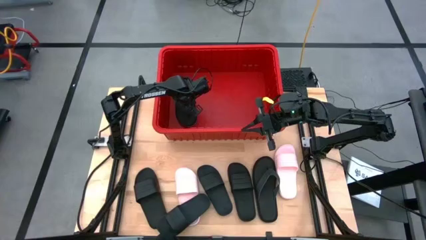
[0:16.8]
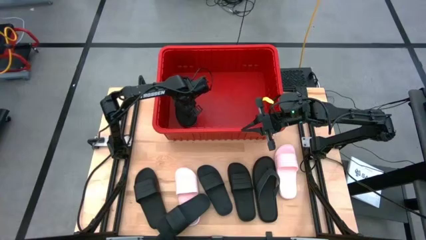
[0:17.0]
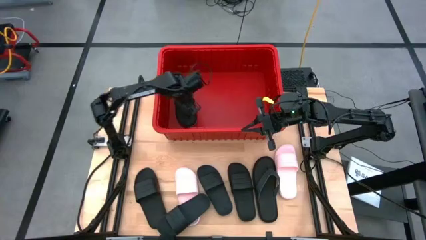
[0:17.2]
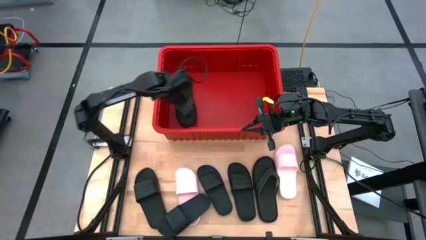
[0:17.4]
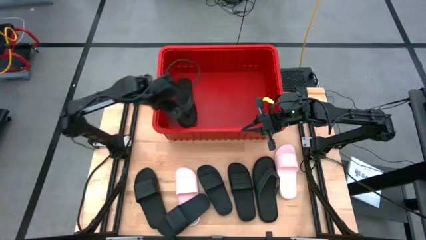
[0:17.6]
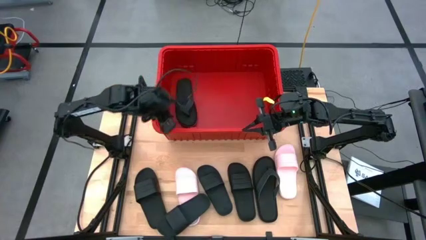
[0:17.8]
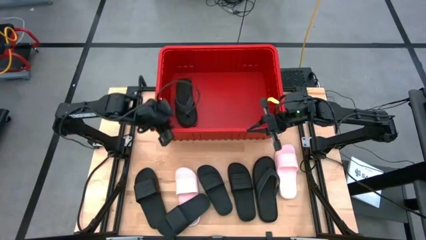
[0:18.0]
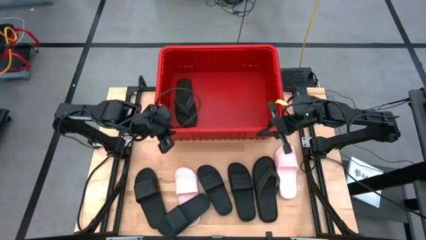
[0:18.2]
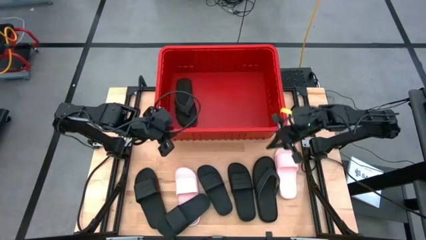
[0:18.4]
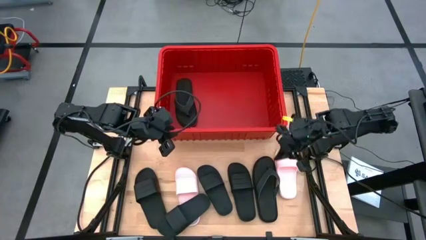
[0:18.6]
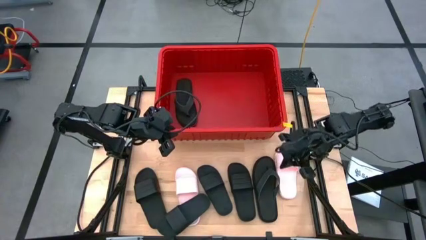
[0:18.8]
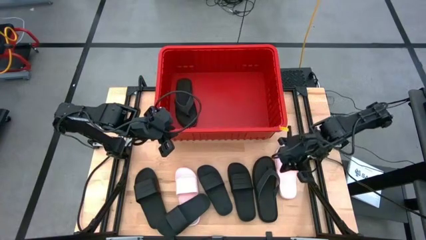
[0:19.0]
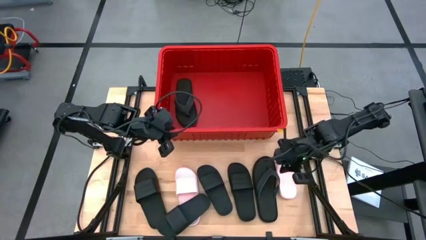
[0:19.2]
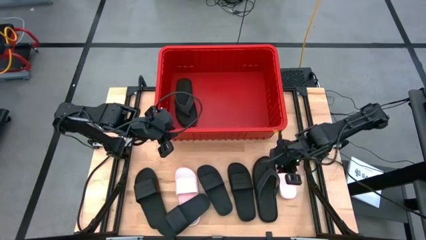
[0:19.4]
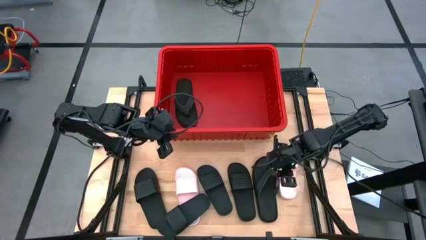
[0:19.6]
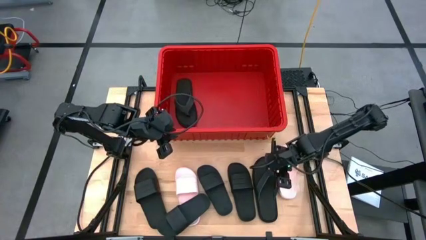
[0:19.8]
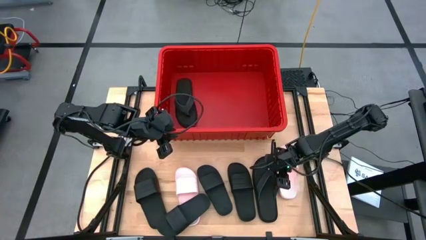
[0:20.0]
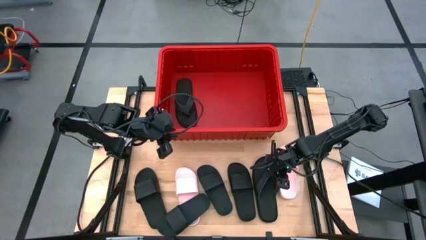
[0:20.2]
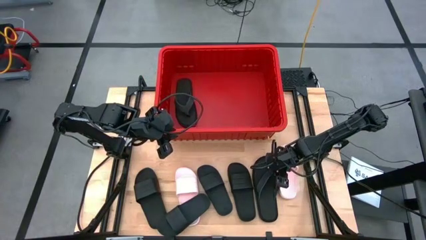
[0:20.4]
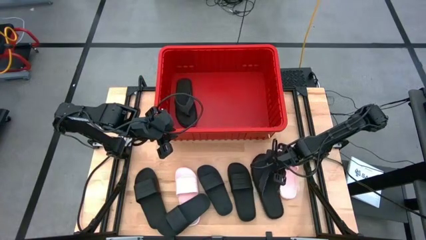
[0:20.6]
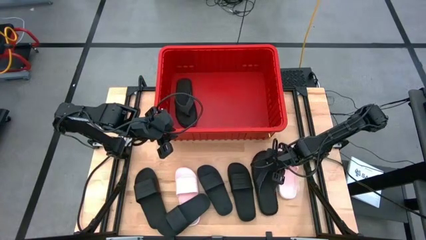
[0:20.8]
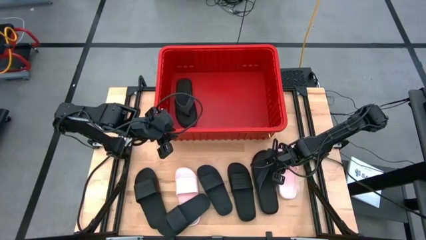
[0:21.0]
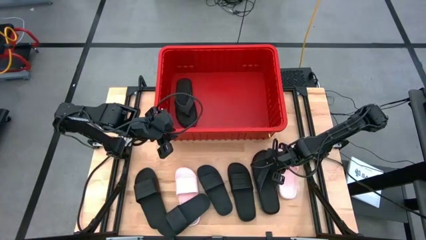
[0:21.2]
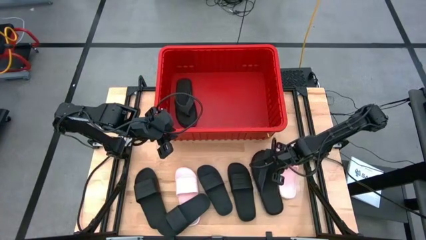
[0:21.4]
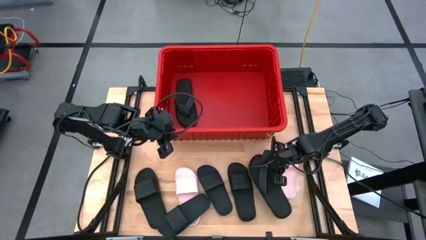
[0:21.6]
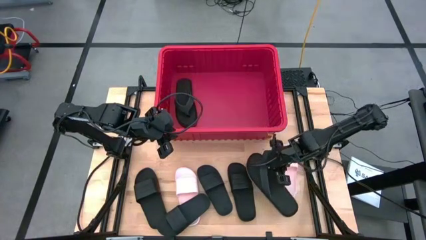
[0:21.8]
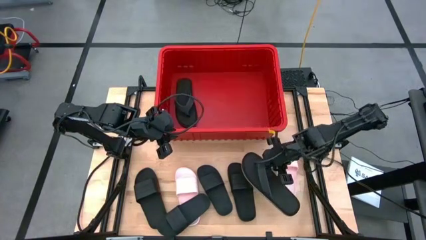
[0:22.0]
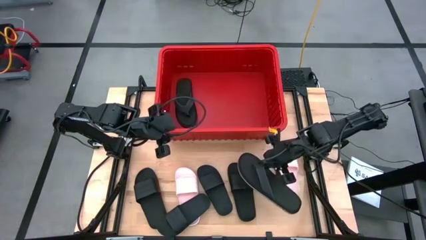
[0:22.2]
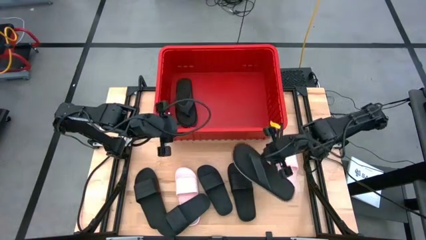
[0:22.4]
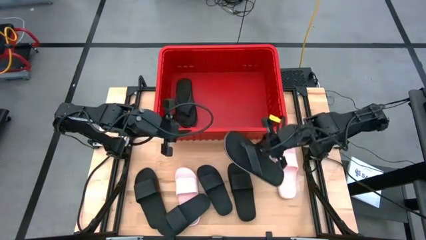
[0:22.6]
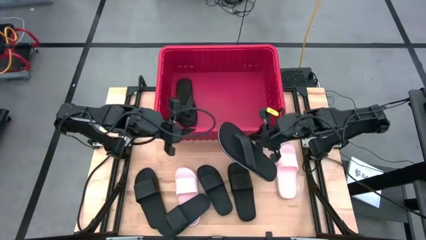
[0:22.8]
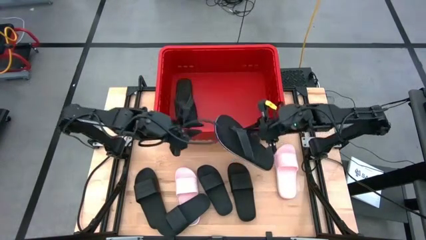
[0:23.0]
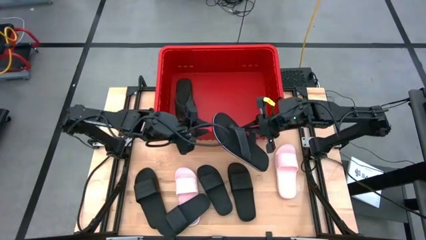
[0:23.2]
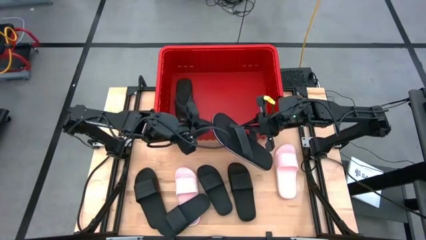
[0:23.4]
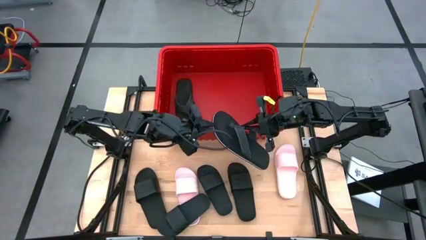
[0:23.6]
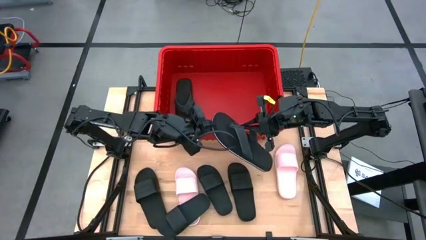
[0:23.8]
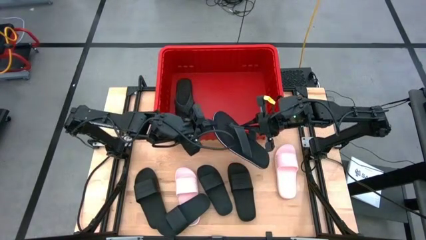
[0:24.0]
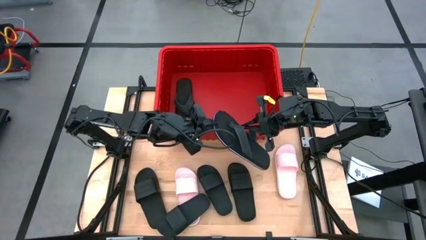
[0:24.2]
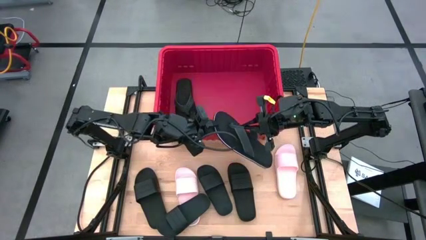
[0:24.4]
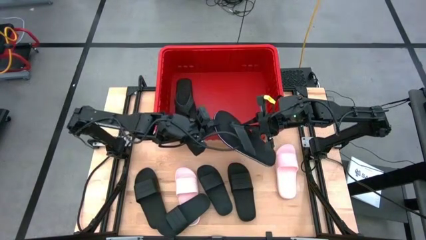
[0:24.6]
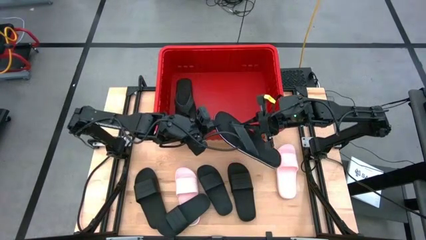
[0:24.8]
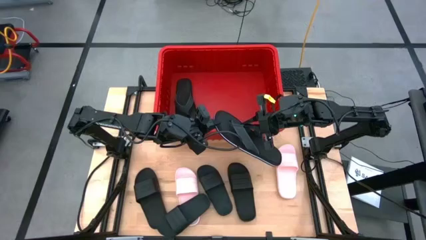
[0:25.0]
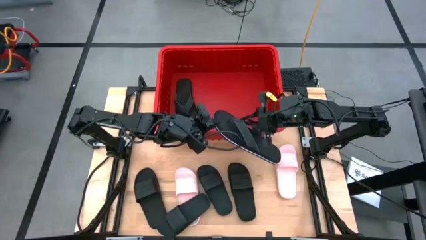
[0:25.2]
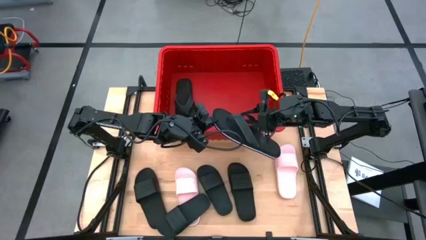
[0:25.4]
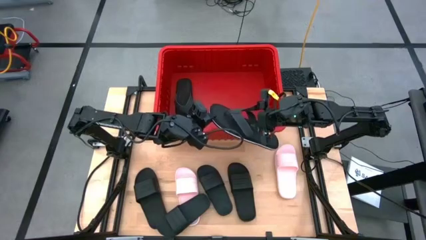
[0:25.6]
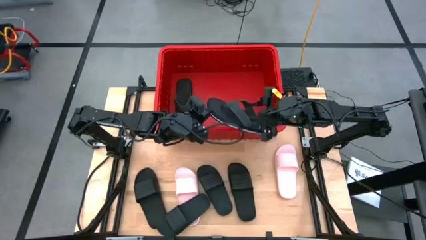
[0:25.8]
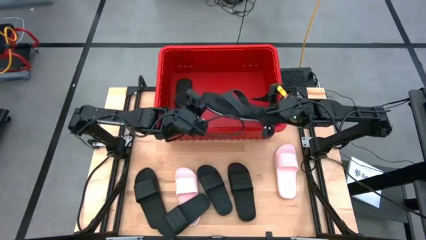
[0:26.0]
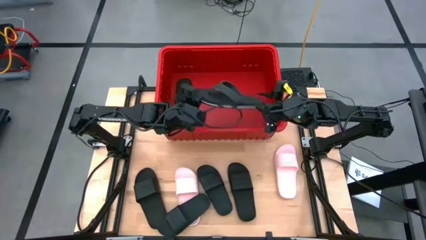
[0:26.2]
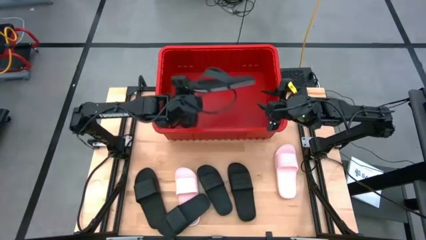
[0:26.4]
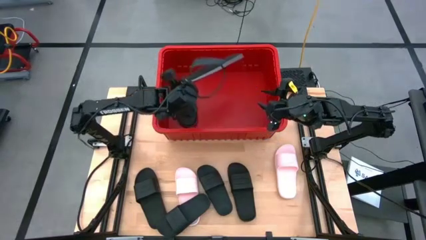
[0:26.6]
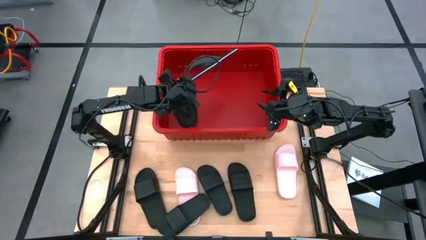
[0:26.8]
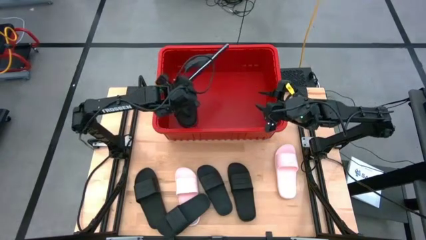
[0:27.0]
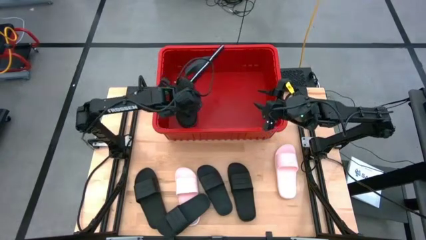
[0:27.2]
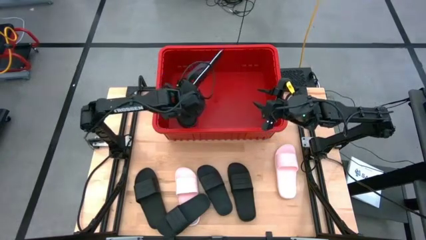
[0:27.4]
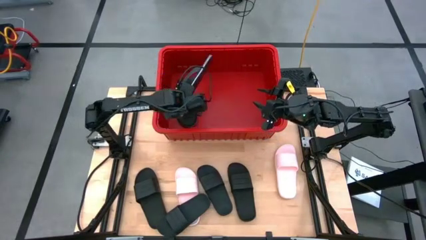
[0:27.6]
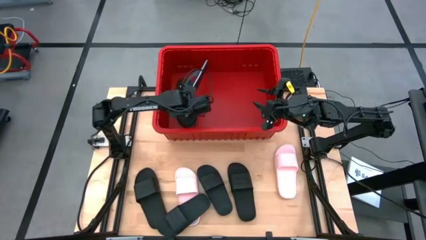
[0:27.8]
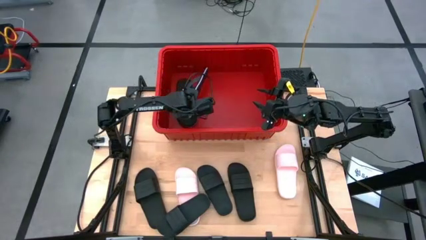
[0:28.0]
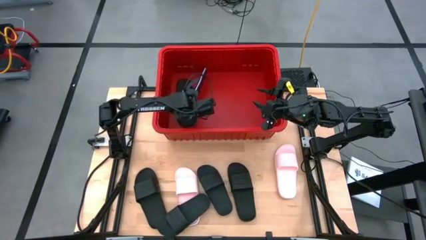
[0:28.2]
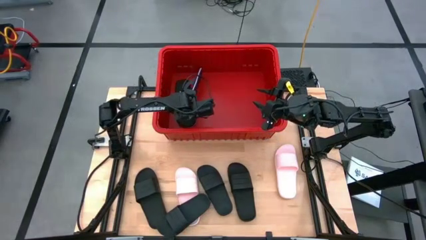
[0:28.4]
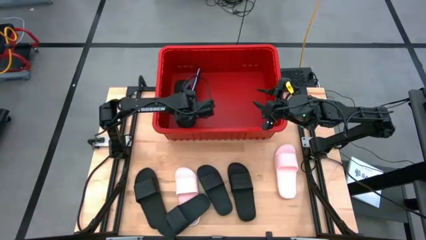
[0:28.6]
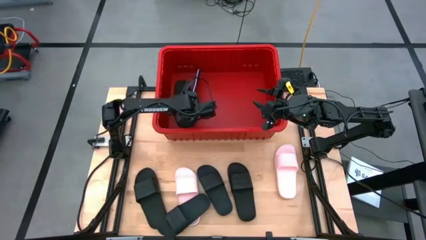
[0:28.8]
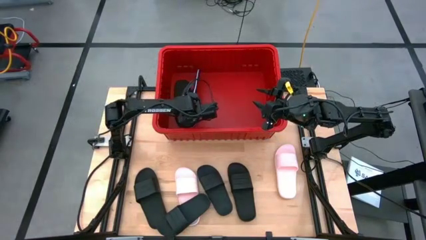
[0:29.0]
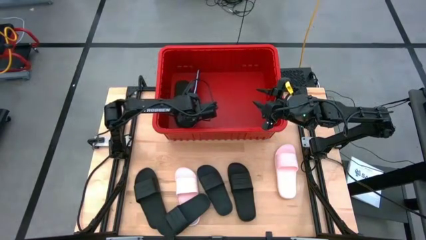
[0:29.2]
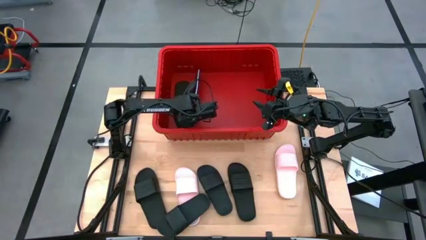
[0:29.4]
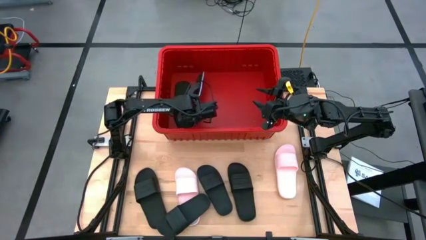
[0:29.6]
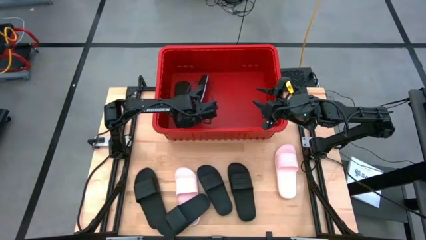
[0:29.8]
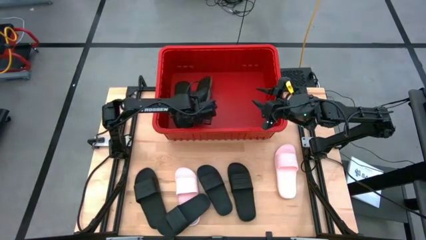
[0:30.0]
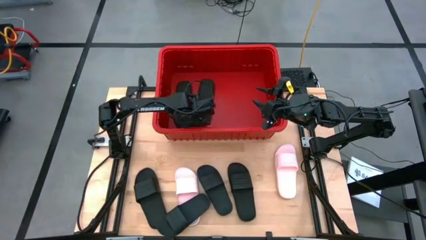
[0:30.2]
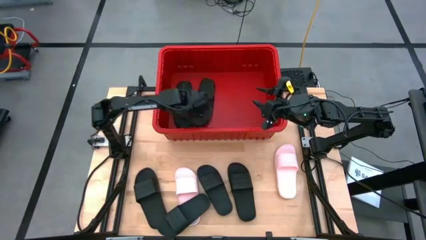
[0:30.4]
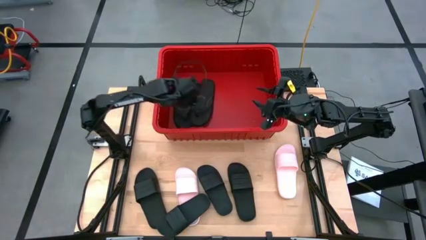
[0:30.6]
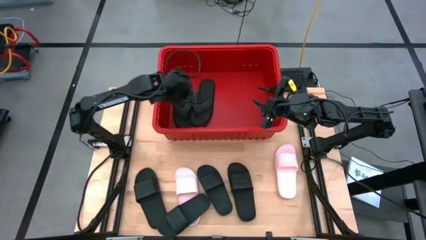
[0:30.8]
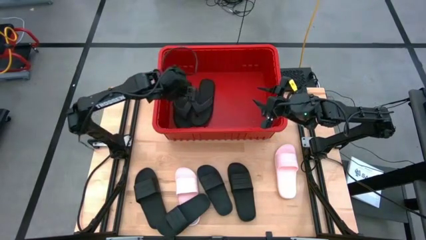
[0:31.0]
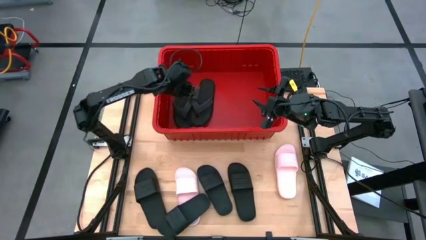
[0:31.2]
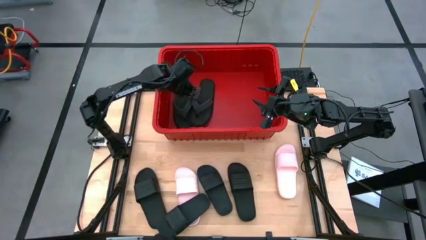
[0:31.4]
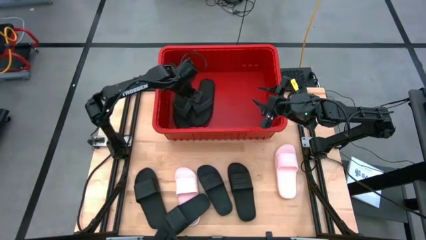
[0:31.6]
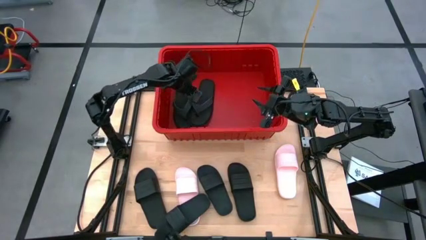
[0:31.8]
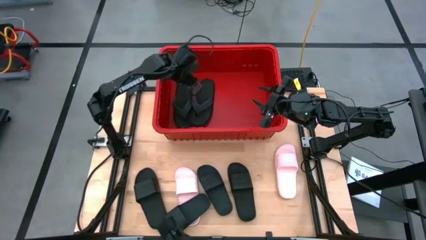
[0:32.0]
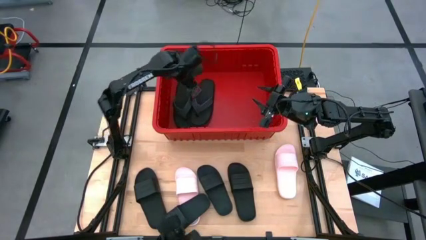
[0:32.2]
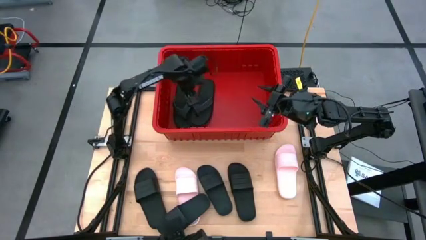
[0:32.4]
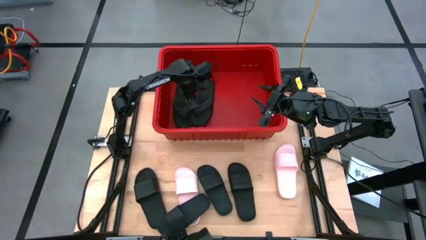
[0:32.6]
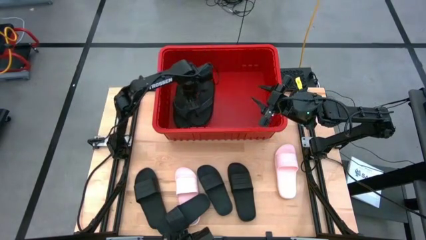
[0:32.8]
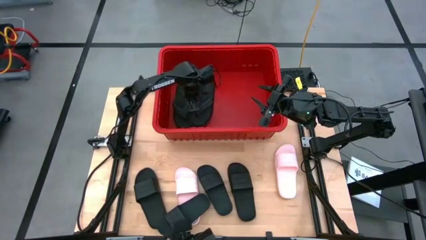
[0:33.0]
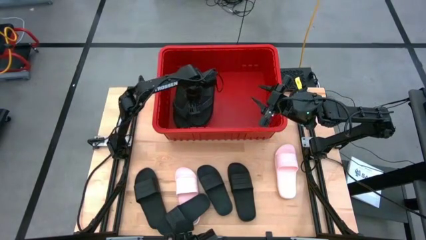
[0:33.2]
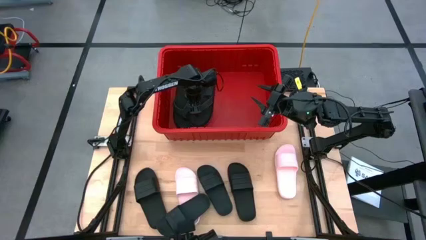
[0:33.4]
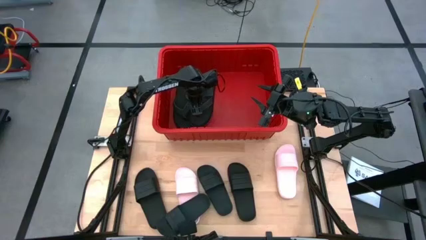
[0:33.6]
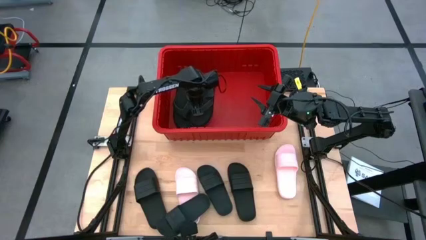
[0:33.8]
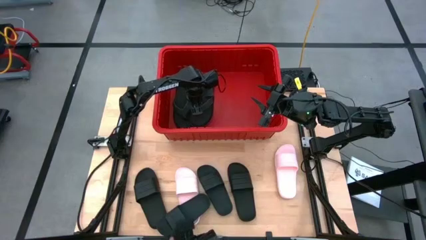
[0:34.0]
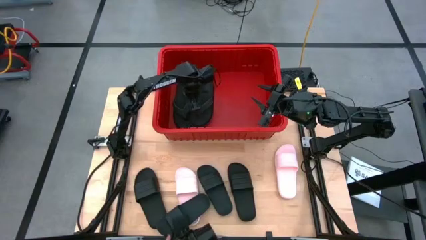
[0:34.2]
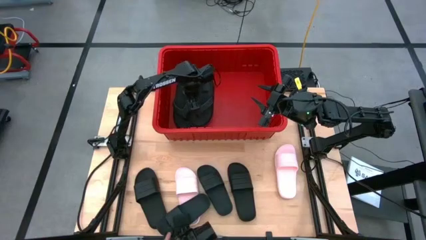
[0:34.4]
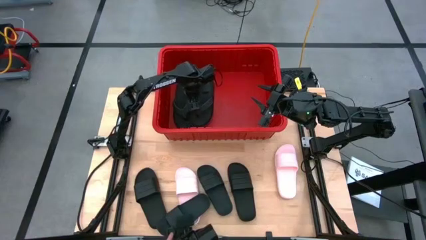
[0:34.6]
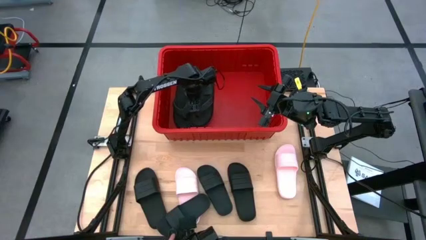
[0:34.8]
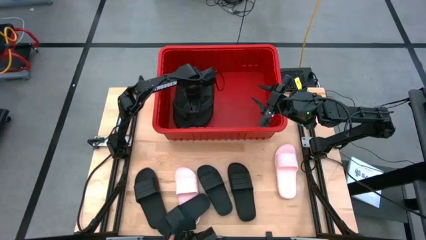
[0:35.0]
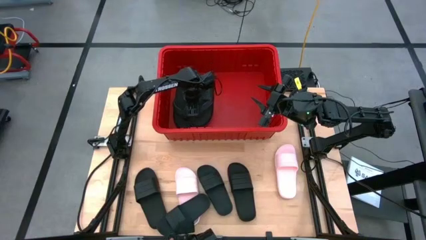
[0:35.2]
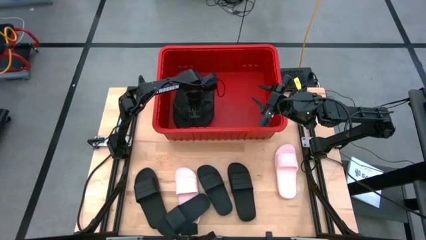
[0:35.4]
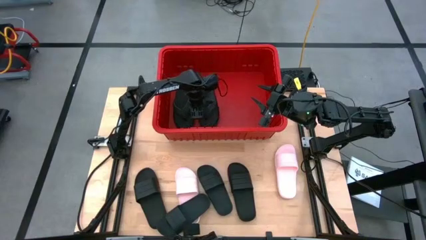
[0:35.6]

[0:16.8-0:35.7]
Task: Pick and place slides into bin
Put the black slipper into the red bin
